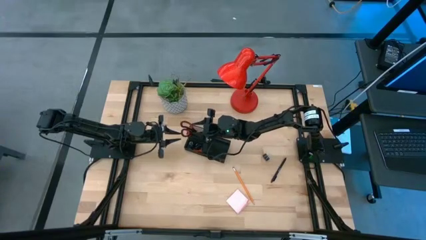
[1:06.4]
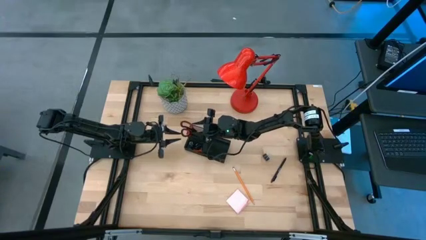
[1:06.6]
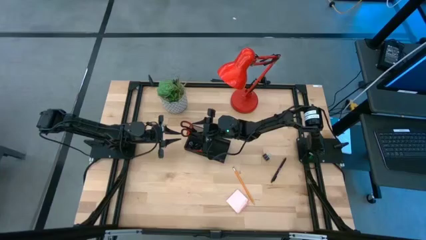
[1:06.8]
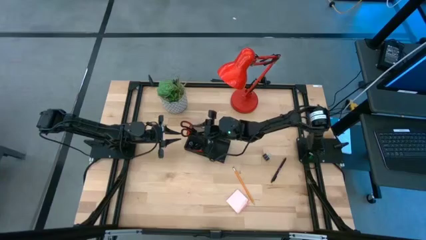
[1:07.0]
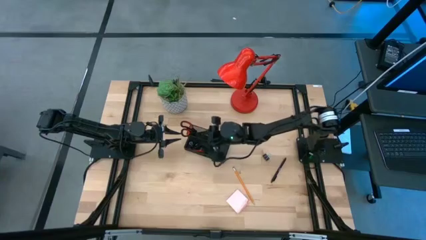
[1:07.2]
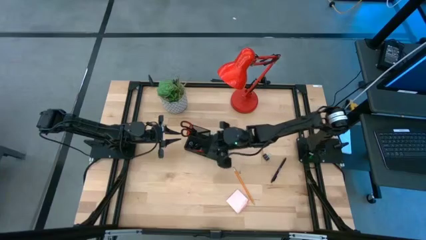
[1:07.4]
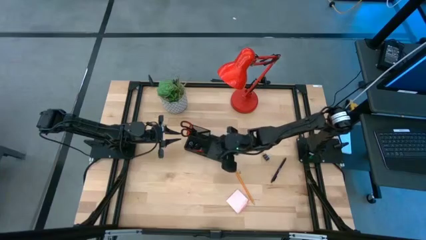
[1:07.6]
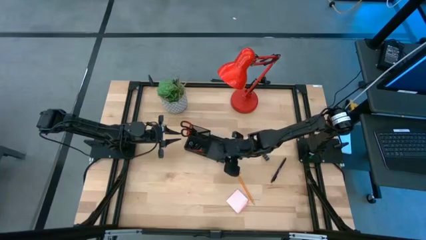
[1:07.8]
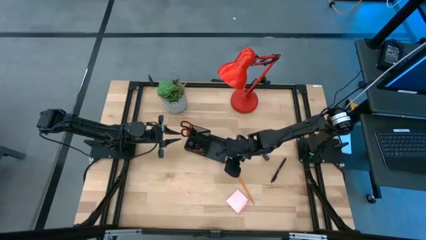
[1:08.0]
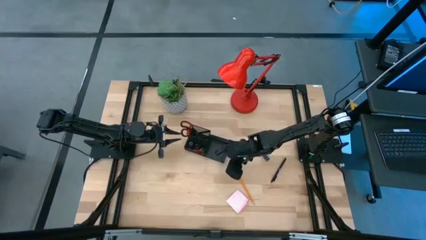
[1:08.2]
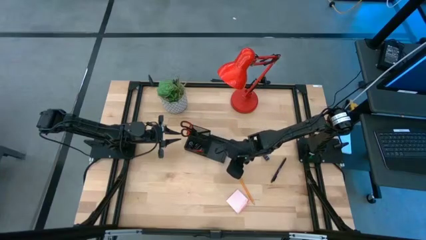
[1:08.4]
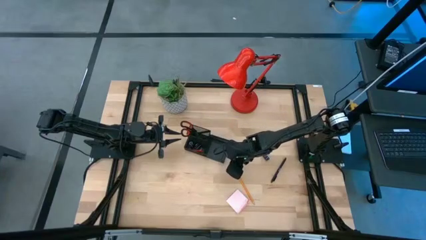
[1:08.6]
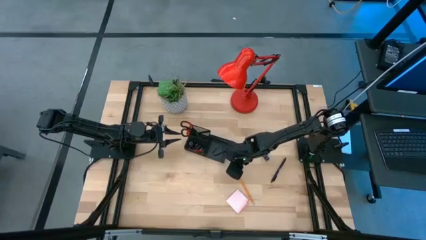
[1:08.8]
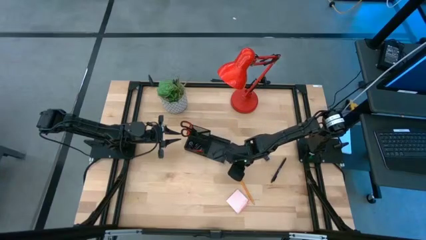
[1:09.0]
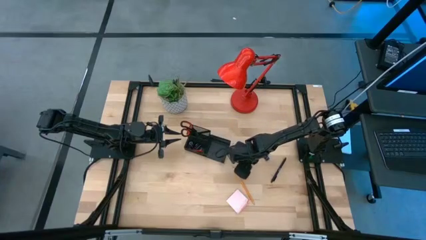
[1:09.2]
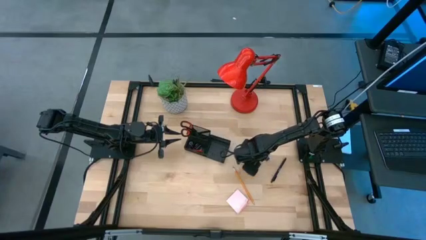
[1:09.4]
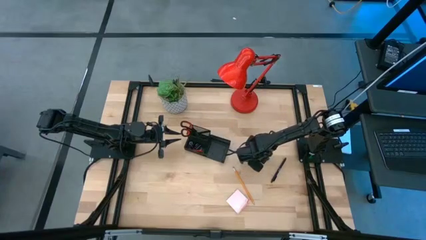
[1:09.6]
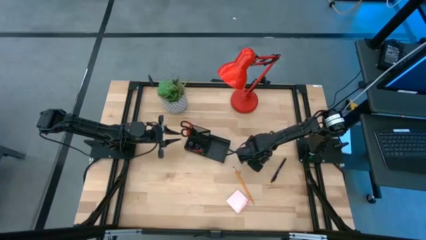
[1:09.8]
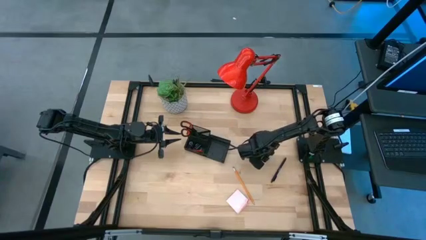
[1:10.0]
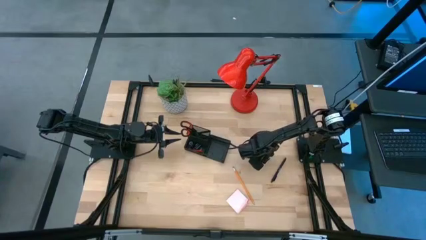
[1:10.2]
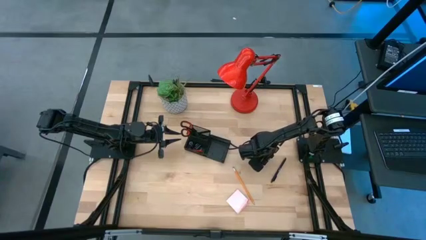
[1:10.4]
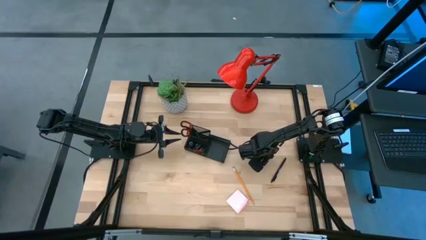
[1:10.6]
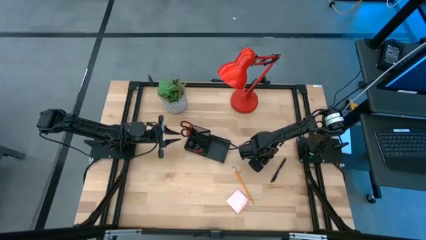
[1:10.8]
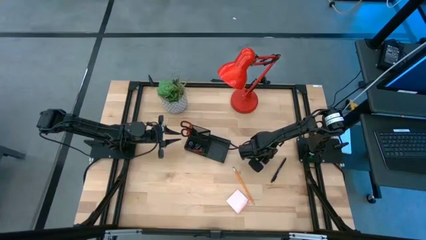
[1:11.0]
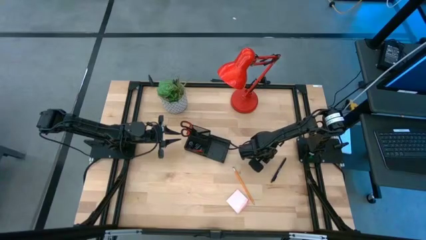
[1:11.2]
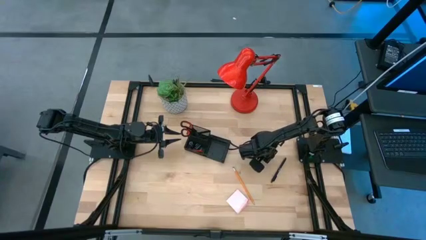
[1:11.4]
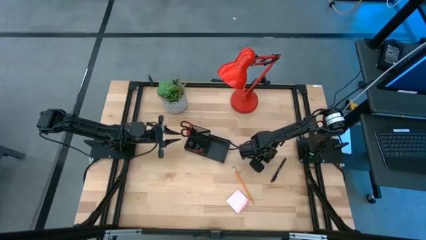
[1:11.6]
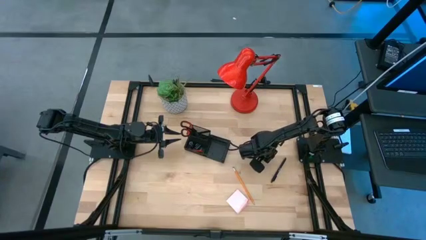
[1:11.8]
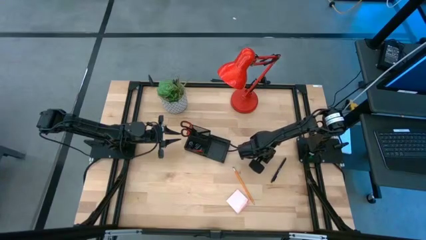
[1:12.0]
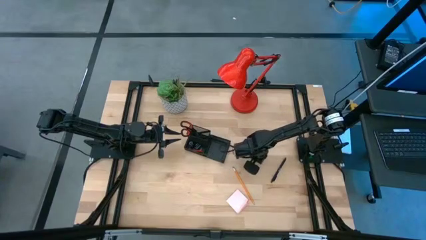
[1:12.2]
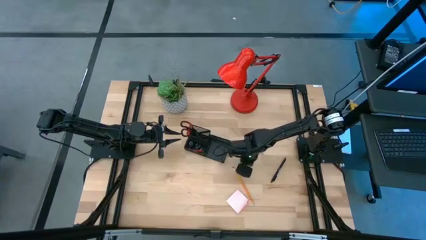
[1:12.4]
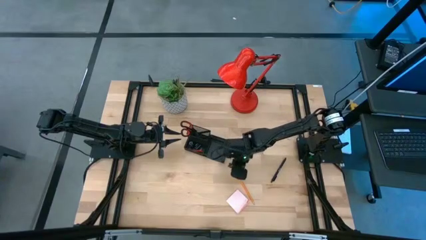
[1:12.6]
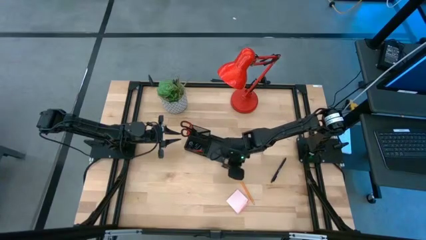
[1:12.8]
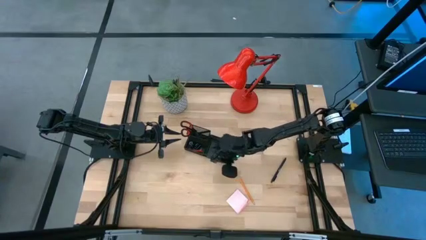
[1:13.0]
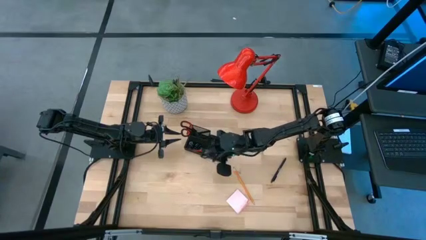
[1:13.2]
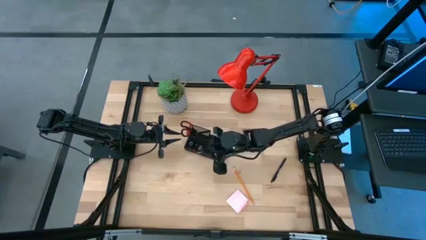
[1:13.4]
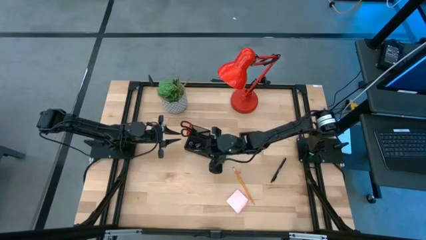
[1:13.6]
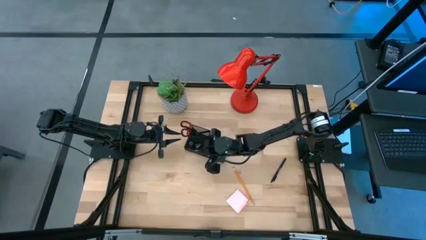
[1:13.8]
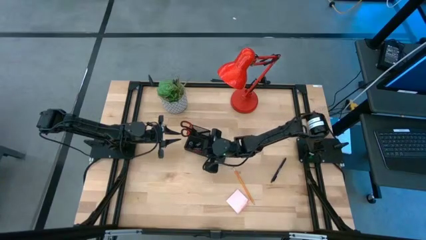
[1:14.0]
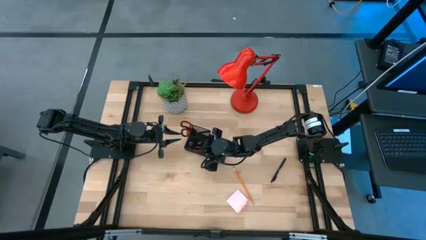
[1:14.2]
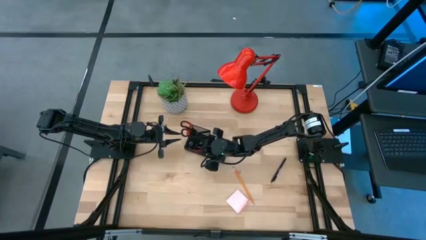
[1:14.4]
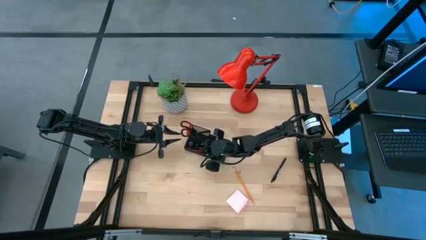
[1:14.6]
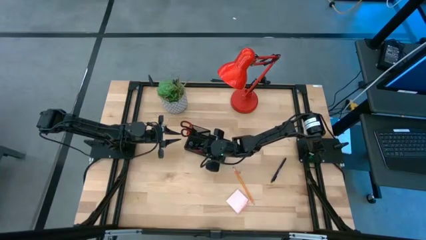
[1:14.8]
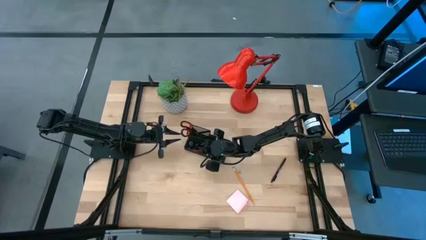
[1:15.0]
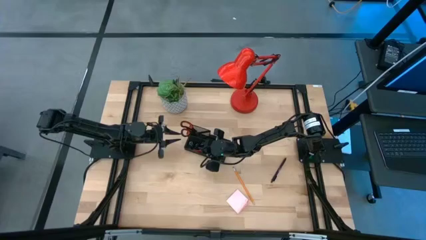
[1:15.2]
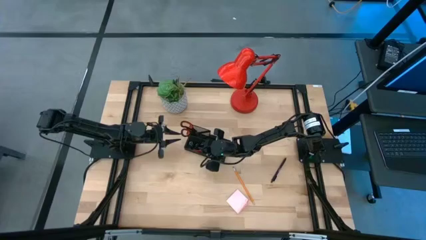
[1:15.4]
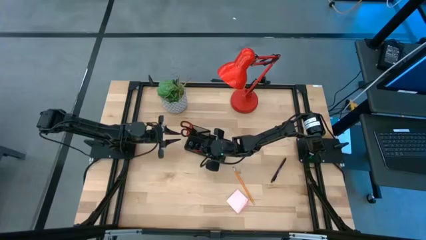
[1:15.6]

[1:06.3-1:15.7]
Task: Pick and place office supplies into organizer
Put the black binder clip into the black desk organizer
